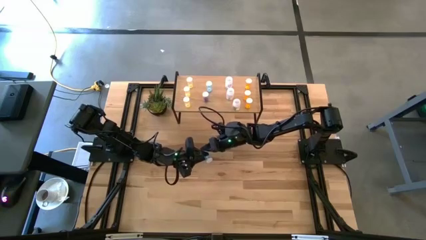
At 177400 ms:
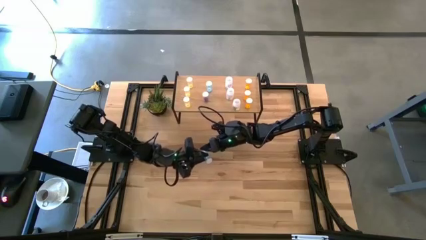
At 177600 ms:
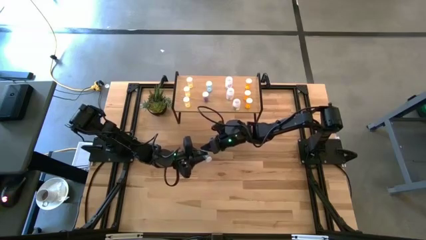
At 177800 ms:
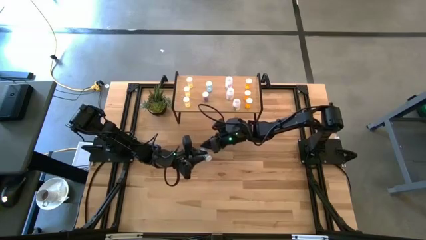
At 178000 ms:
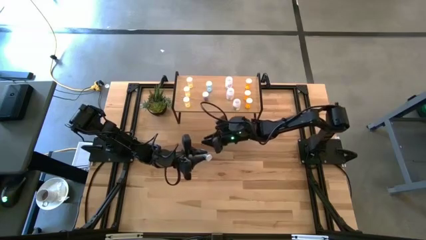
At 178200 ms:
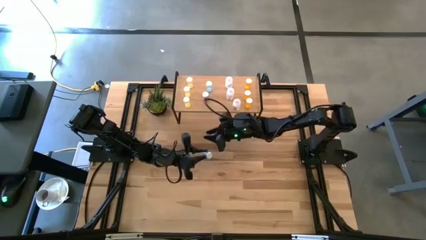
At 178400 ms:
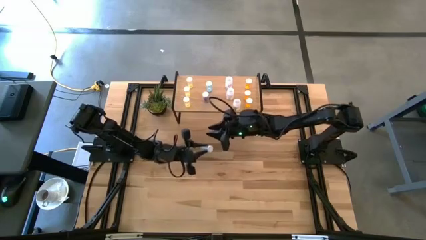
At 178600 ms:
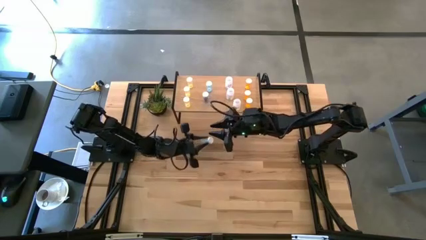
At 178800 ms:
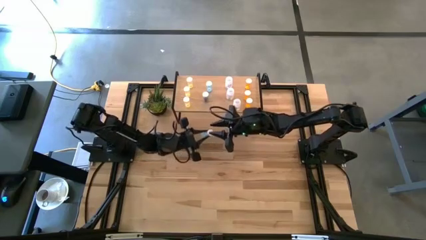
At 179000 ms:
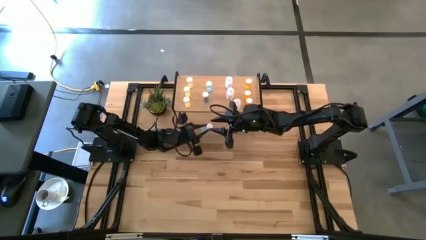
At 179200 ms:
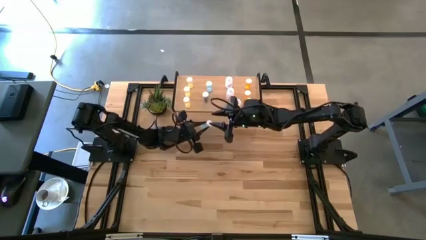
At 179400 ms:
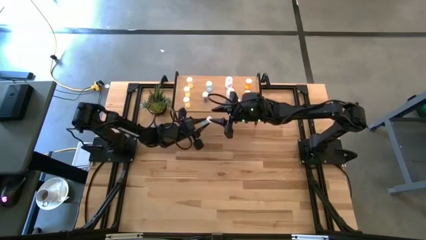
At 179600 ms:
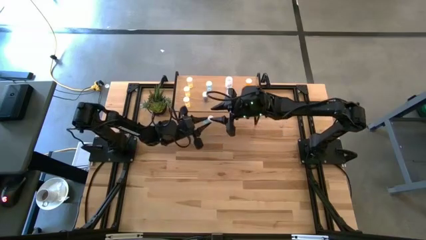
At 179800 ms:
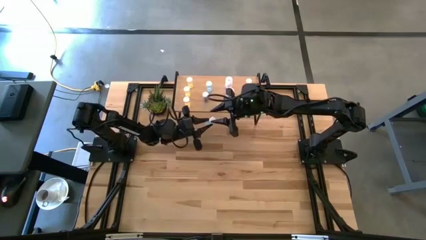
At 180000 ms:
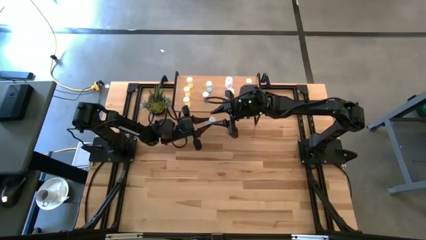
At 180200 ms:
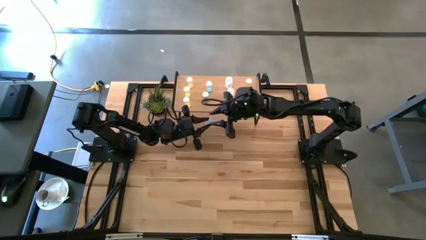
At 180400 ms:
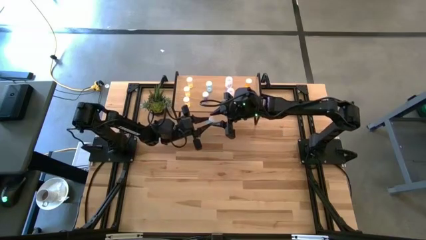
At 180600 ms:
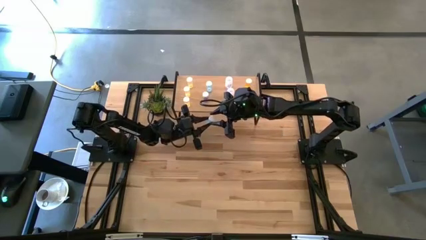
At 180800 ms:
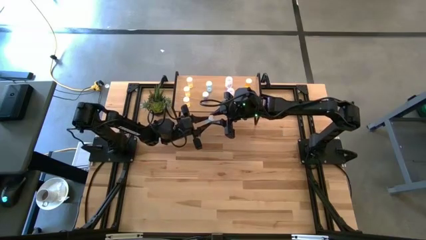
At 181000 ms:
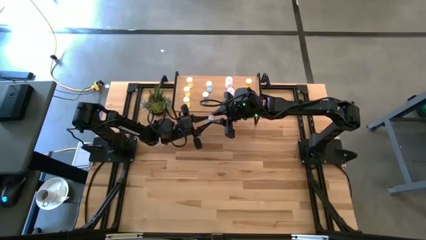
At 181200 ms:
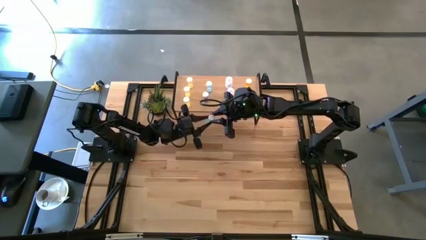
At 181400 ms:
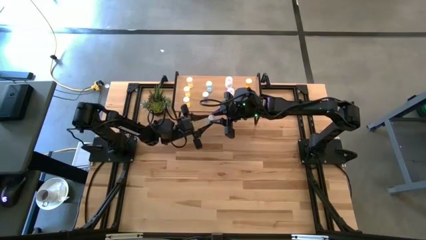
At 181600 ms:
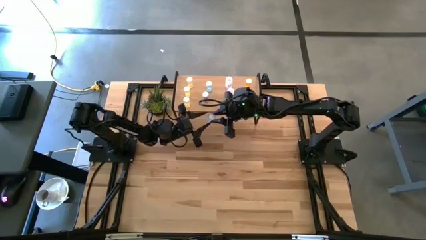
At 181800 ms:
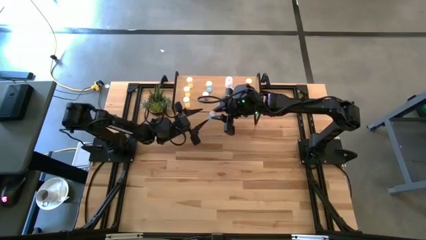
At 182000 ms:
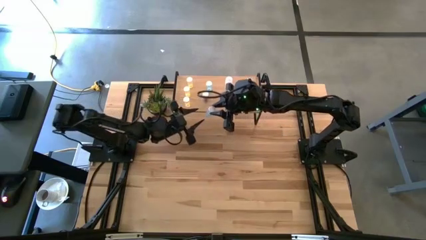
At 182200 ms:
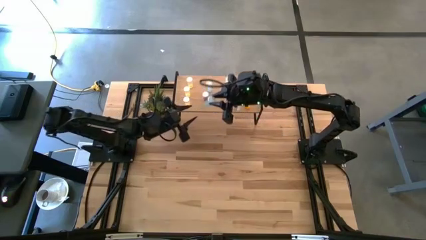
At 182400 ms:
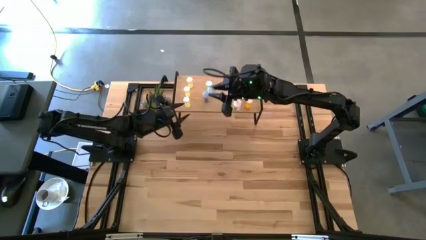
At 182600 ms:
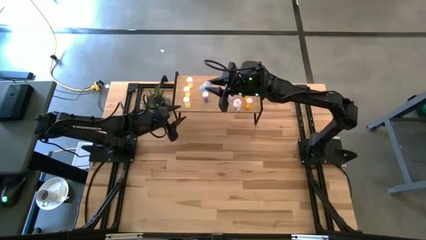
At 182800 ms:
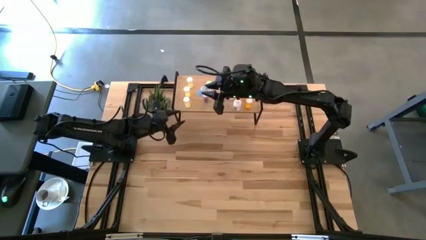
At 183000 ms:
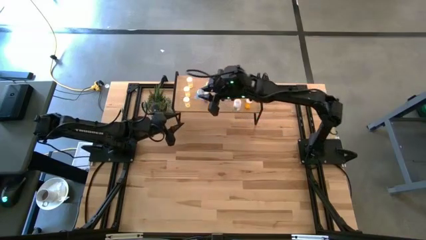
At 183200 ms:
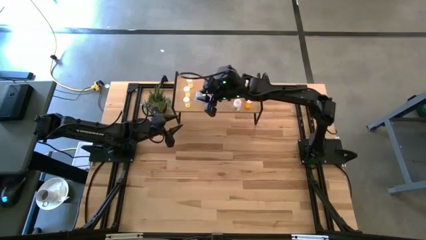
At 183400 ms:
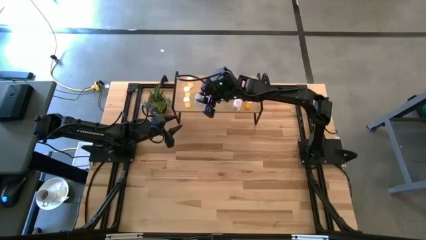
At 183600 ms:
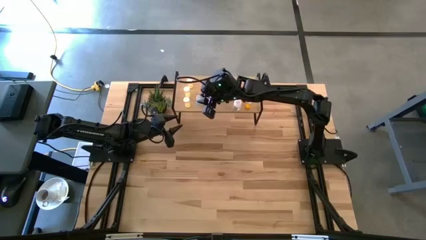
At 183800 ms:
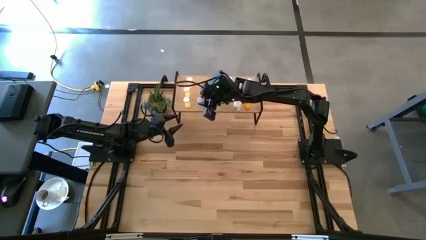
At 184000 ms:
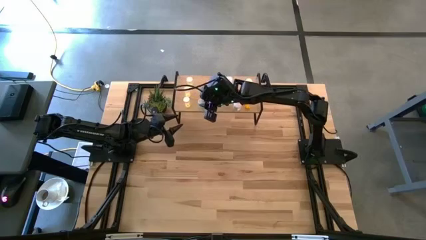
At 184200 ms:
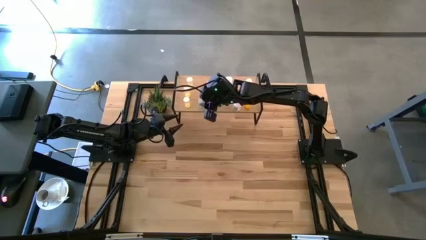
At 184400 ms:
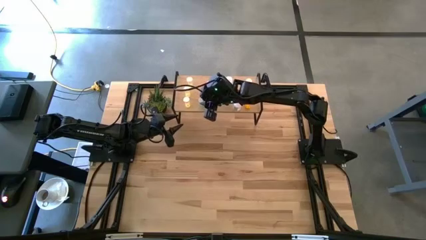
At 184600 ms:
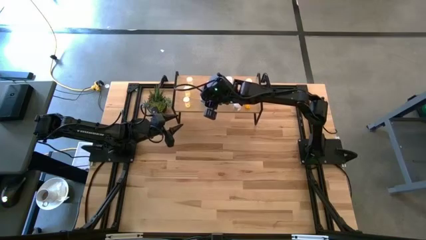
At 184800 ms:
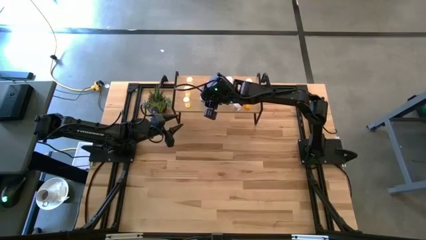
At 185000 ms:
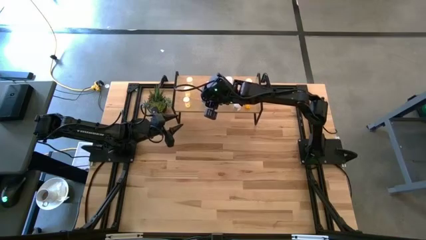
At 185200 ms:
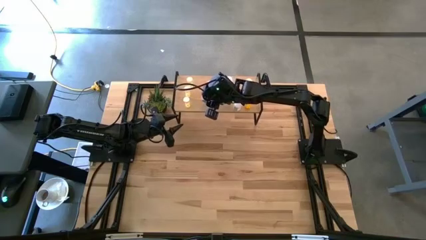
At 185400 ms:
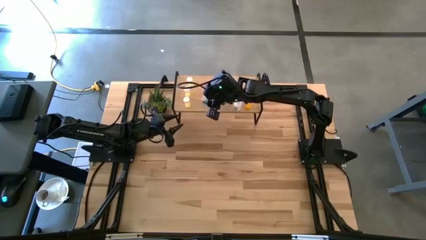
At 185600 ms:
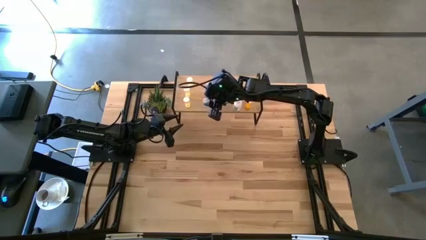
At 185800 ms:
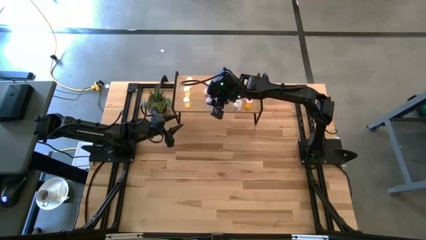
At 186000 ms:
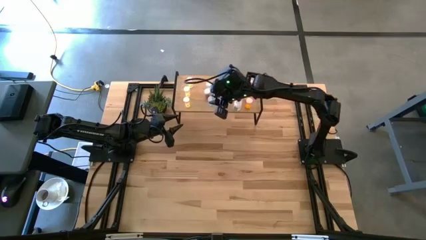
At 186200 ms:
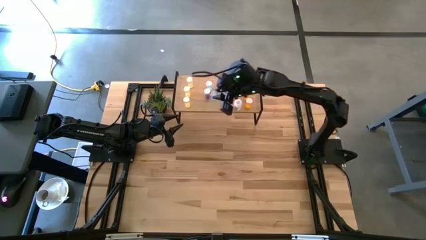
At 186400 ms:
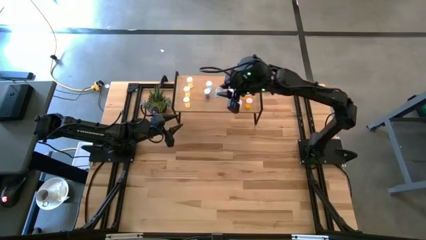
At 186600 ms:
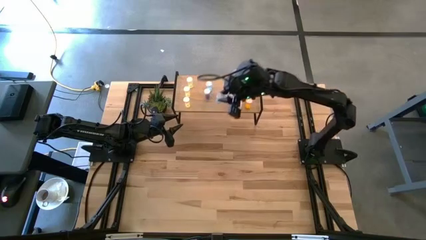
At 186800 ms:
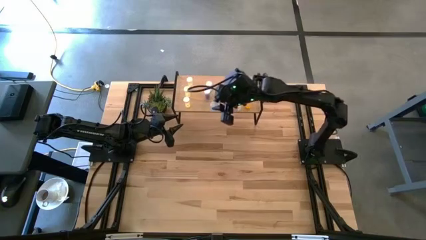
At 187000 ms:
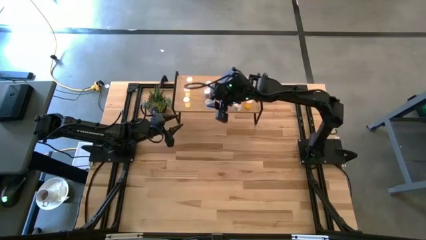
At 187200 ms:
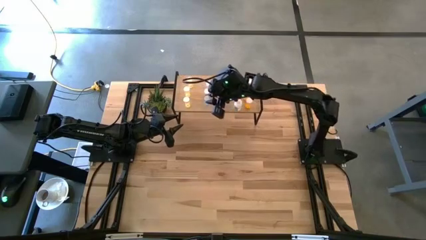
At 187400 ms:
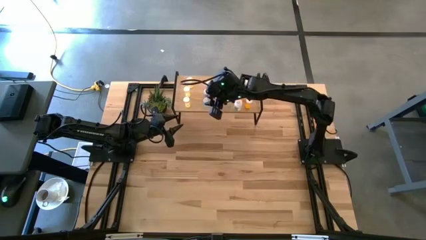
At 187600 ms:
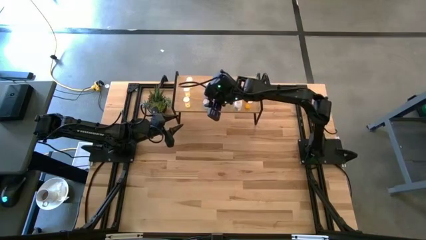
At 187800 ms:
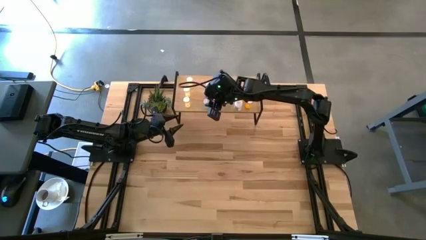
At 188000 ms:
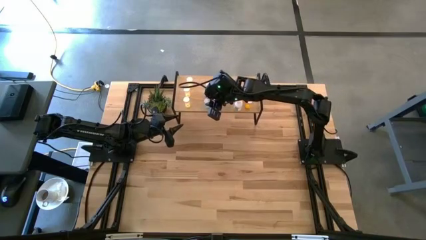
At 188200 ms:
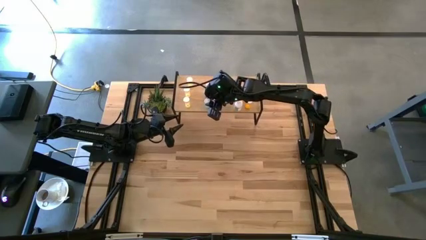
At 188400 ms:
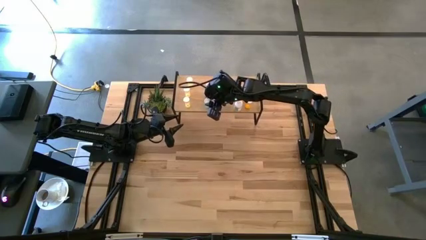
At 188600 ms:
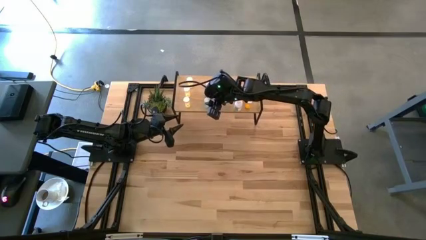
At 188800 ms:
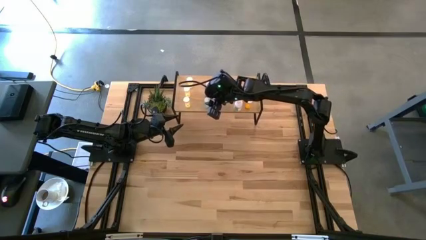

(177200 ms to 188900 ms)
Task: Pick and place medicine bottles onto shelf by color
Put the blue pill bottle on the shelf

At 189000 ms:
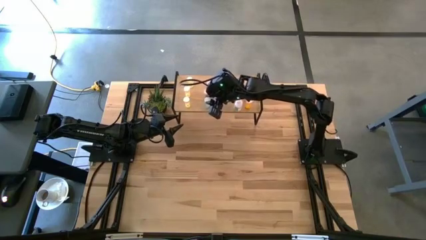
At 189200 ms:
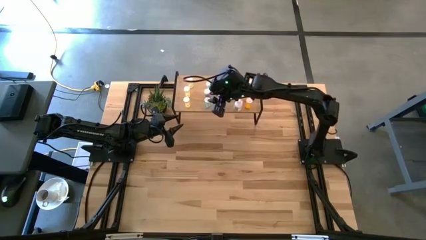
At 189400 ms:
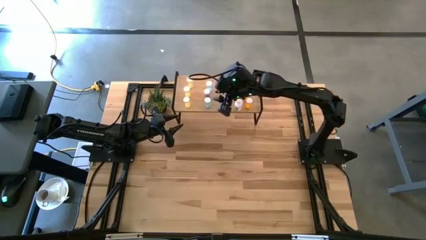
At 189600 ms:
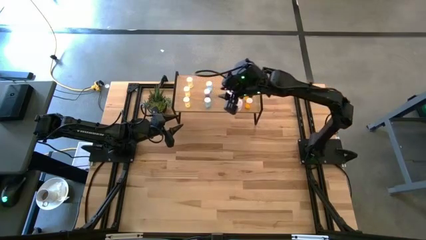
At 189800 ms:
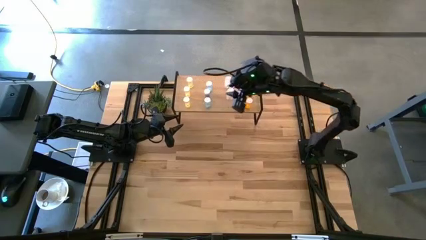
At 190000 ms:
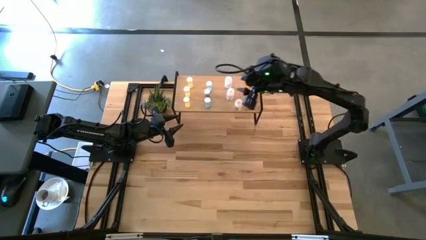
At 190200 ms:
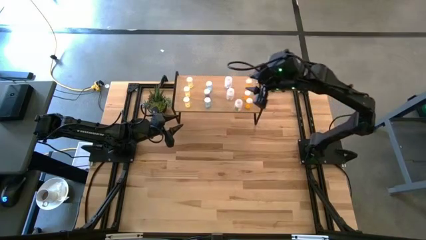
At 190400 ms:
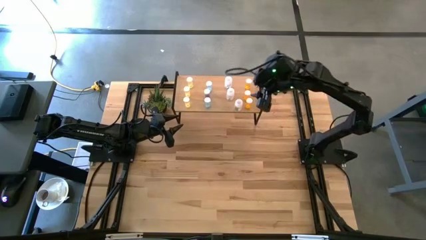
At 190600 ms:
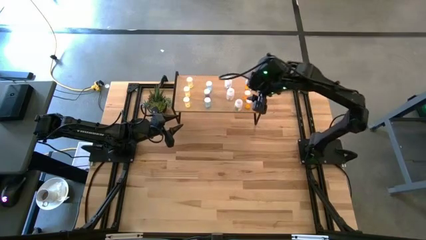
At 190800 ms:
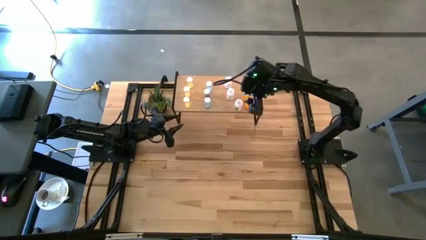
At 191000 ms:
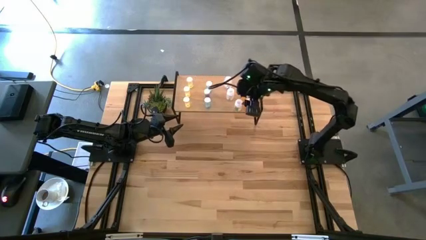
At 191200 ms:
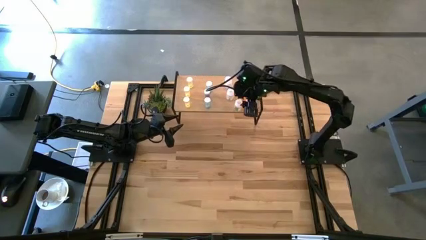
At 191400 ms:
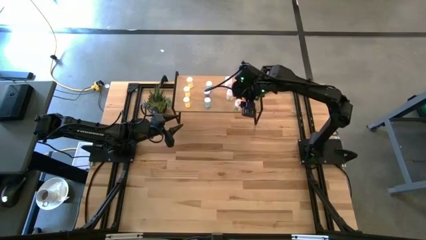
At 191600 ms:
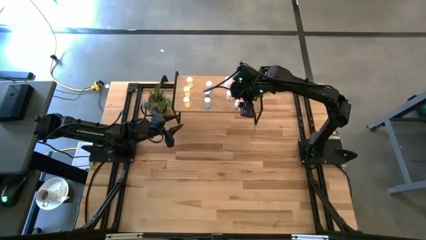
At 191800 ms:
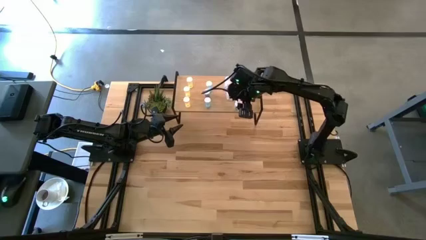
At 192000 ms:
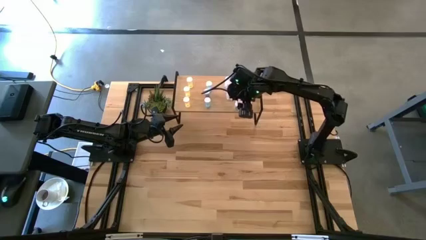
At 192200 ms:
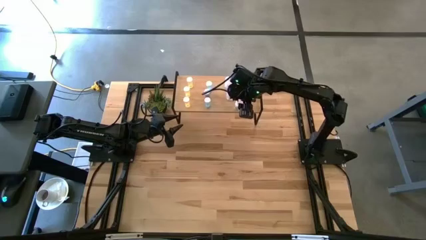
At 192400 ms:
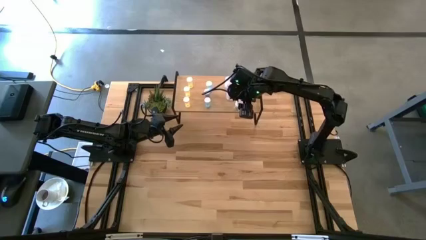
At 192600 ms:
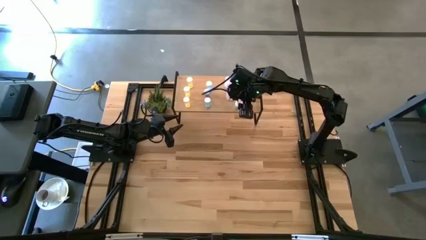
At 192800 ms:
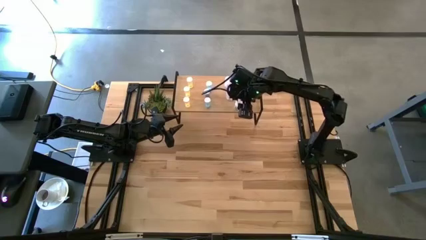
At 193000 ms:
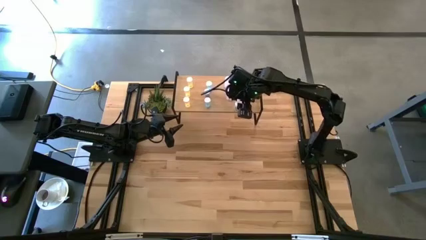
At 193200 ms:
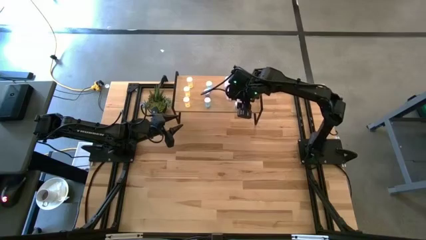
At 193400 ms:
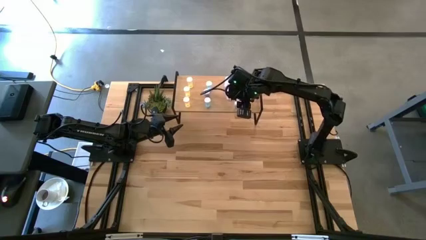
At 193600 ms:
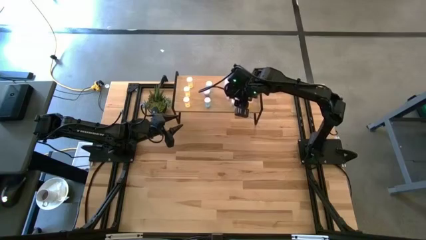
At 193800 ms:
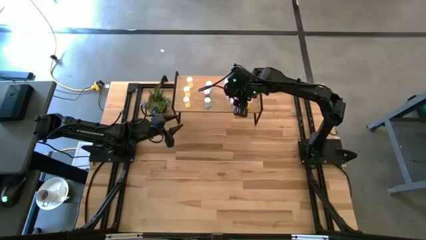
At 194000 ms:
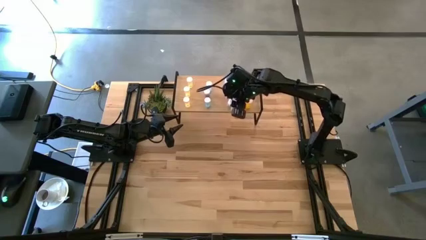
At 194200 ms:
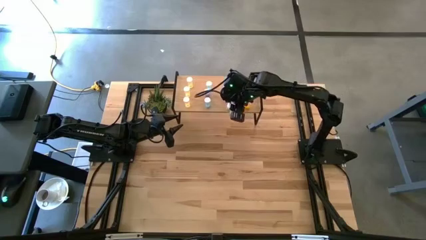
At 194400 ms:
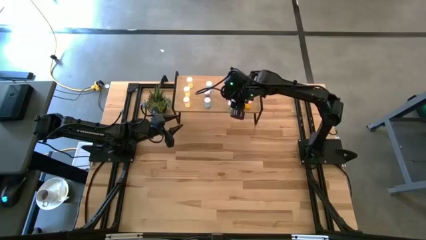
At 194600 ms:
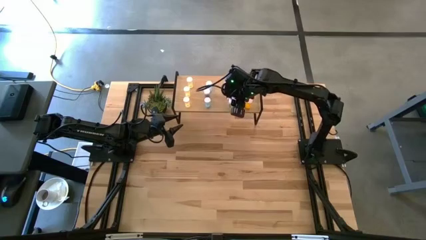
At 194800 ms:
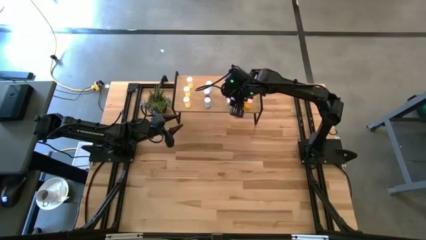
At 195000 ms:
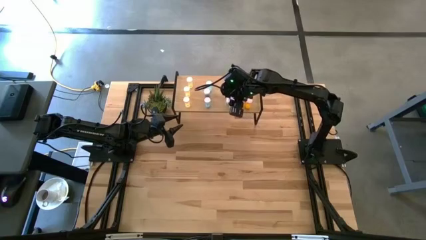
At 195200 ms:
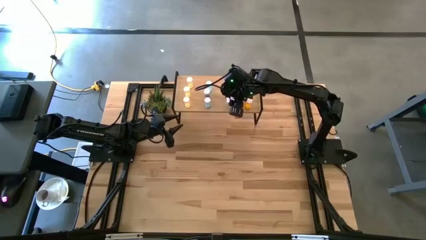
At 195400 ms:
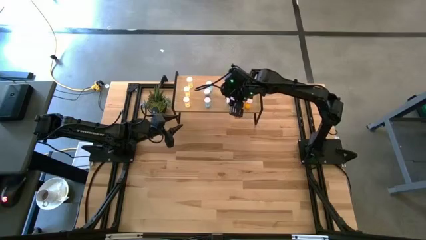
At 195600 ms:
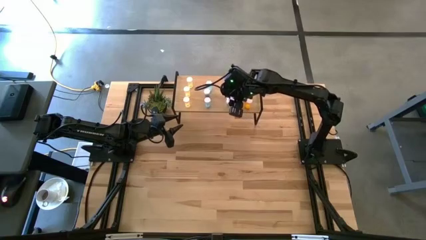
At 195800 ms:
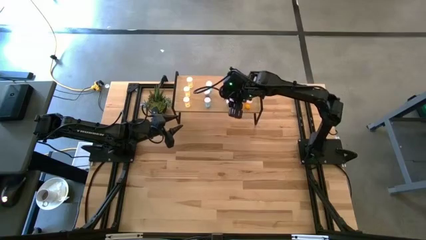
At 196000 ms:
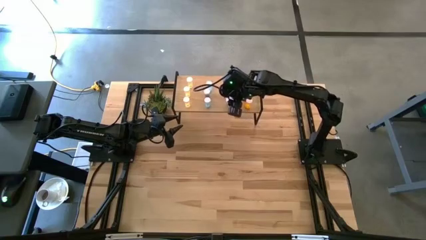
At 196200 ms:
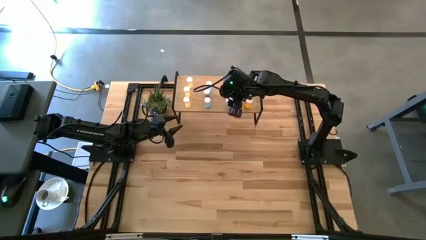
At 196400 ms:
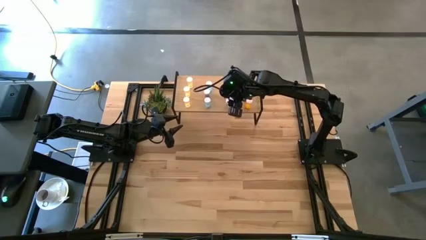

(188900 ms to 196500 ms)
Adjust the top transparent pill bottle on the shelf to align with the others
